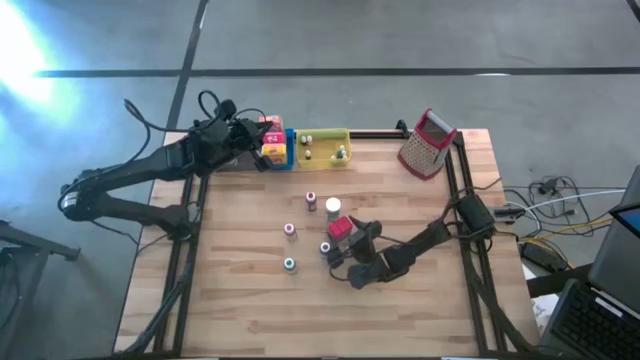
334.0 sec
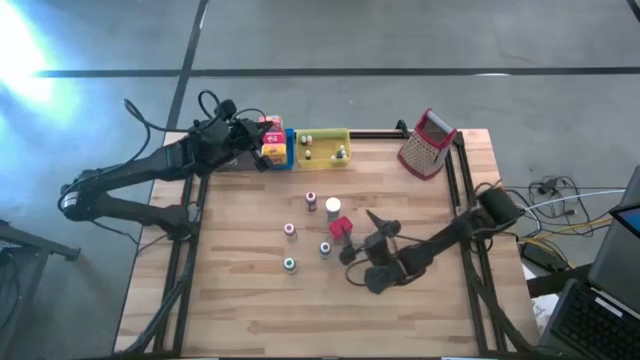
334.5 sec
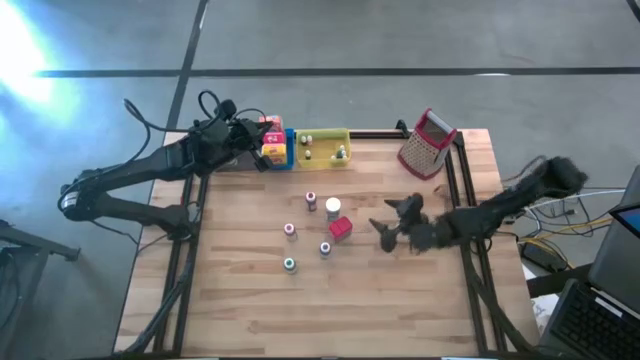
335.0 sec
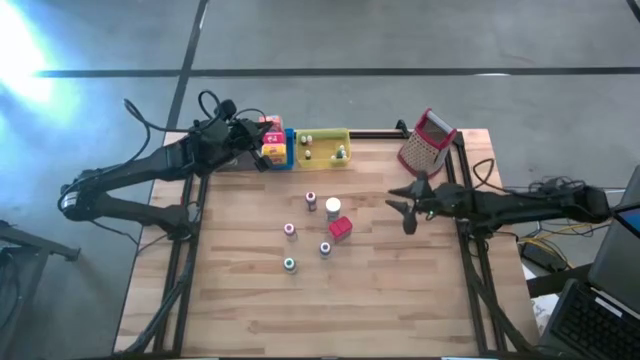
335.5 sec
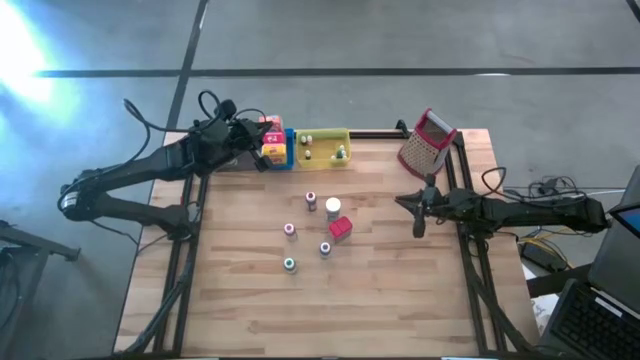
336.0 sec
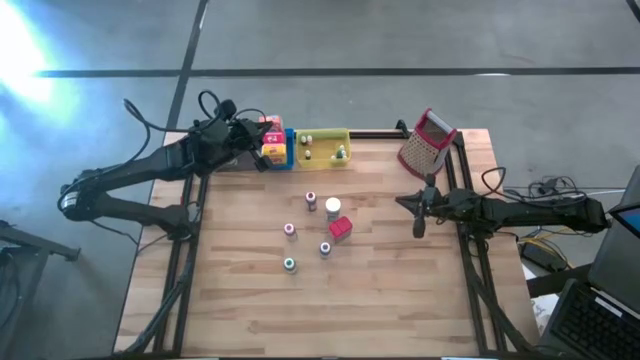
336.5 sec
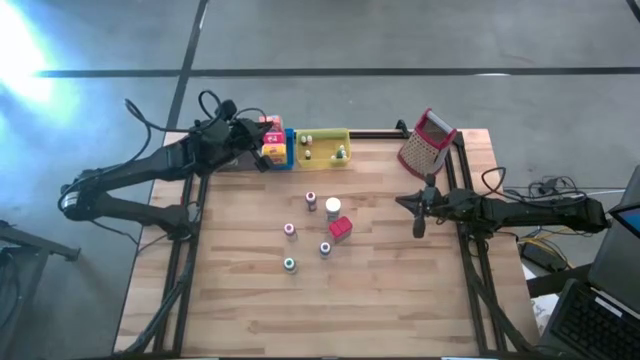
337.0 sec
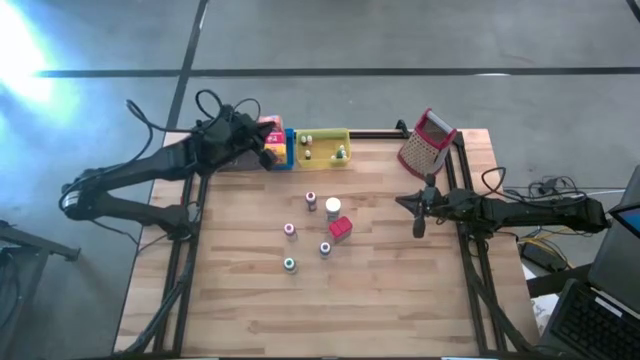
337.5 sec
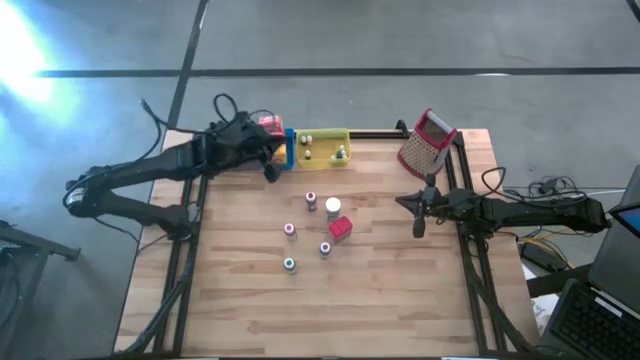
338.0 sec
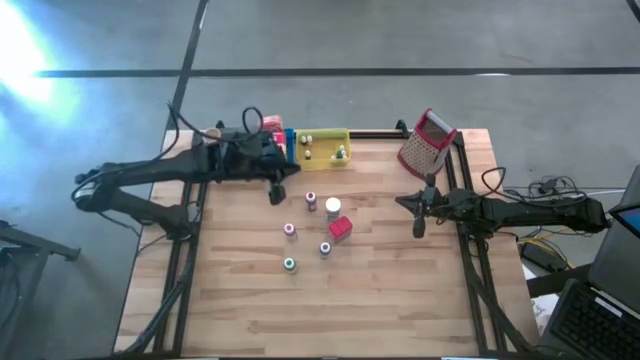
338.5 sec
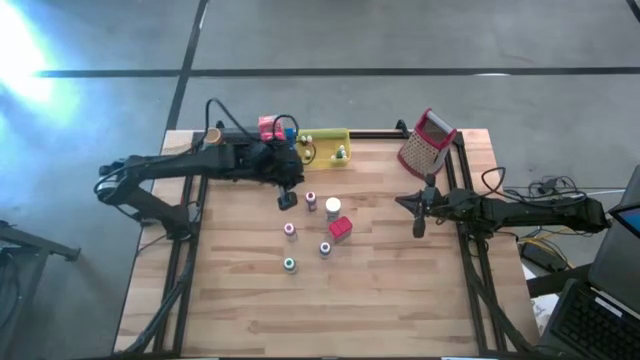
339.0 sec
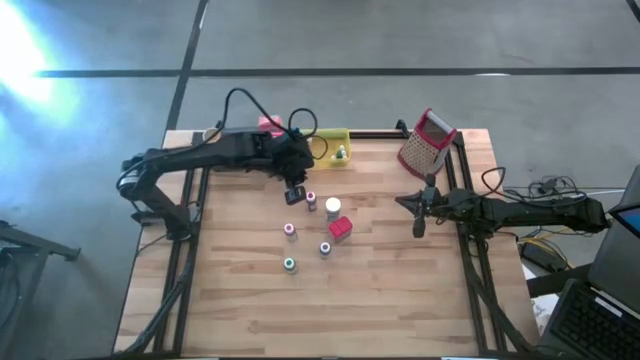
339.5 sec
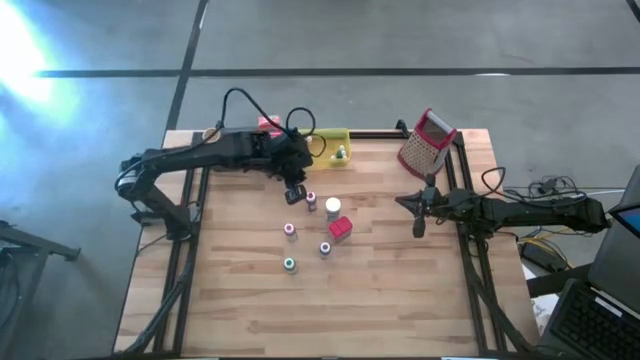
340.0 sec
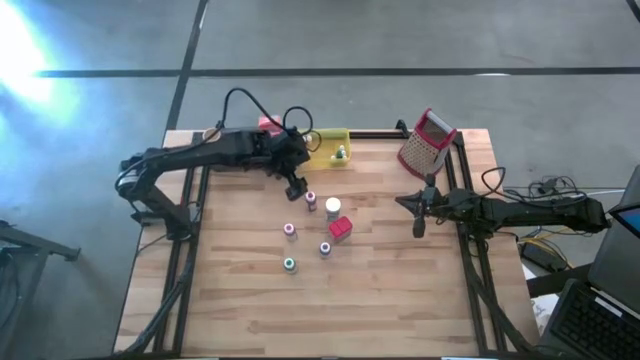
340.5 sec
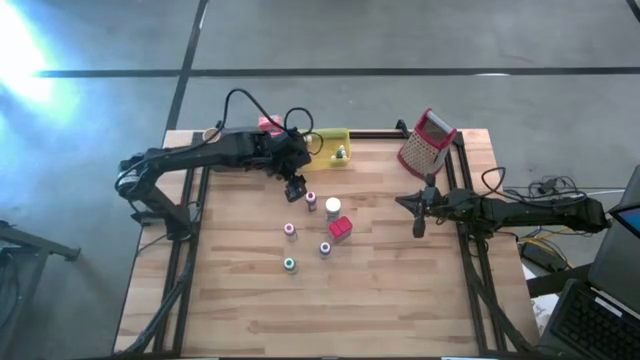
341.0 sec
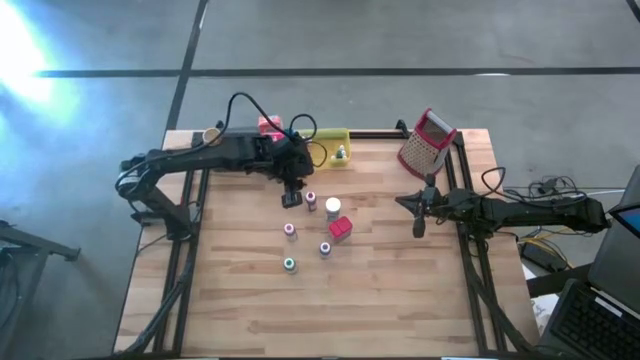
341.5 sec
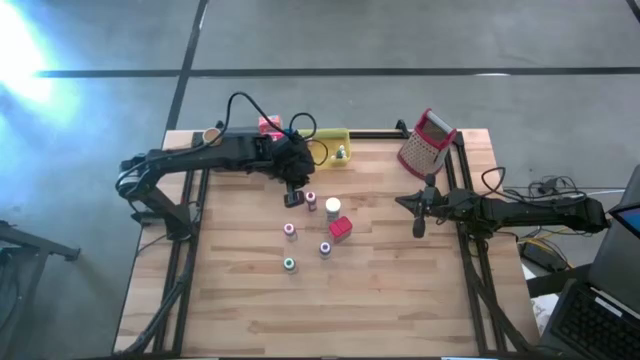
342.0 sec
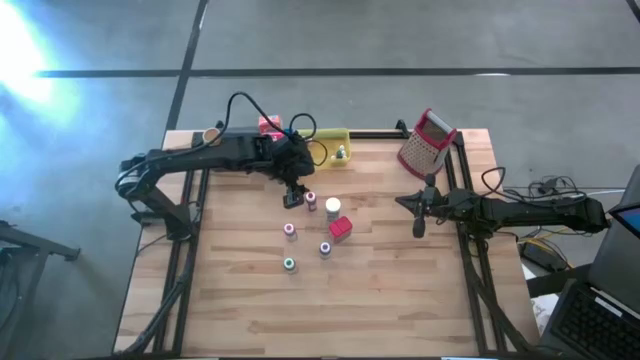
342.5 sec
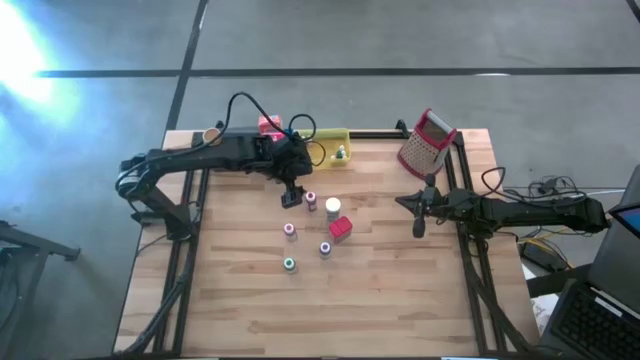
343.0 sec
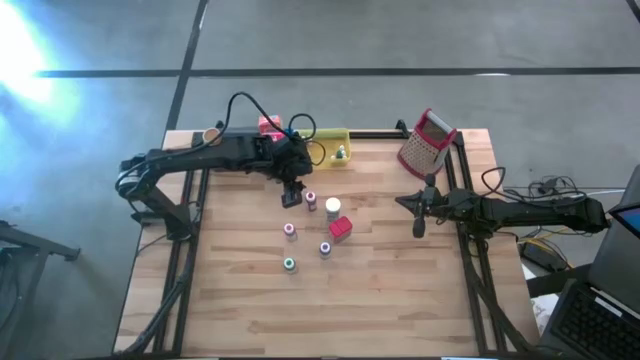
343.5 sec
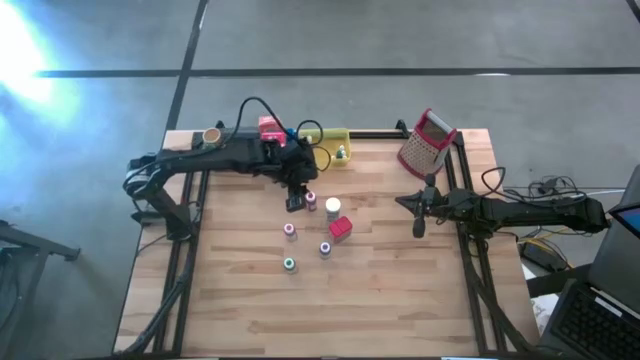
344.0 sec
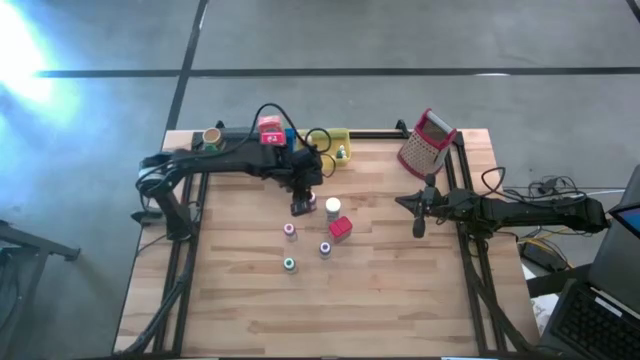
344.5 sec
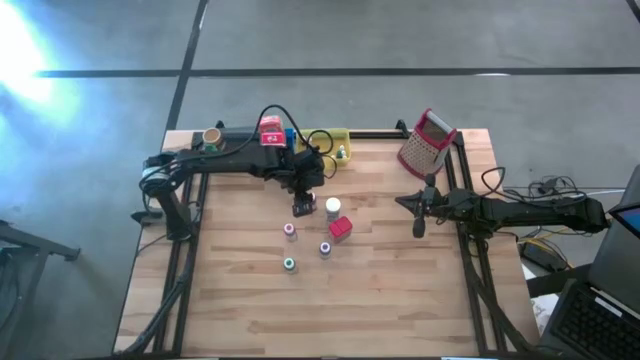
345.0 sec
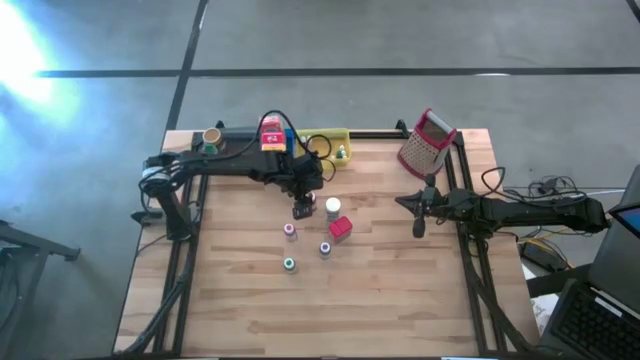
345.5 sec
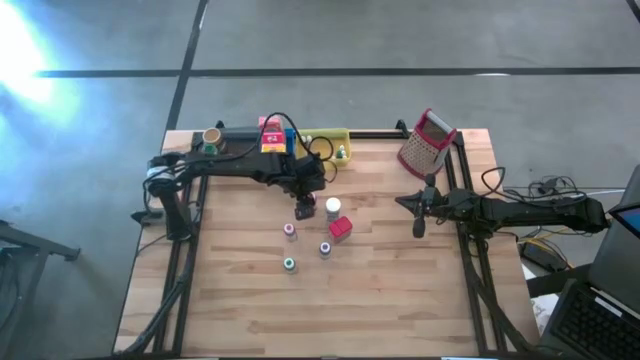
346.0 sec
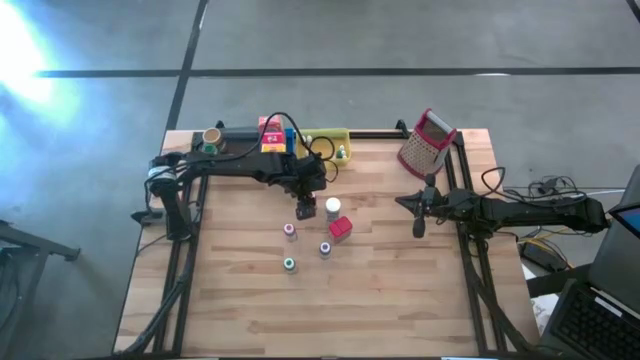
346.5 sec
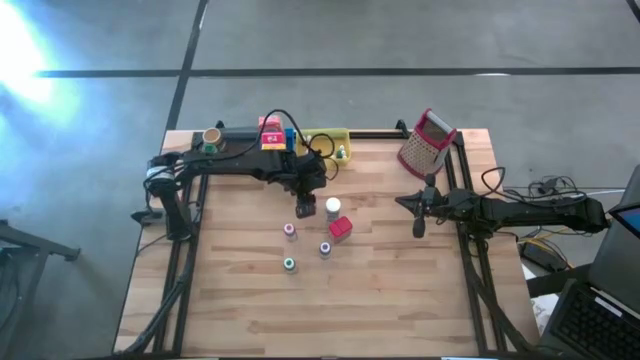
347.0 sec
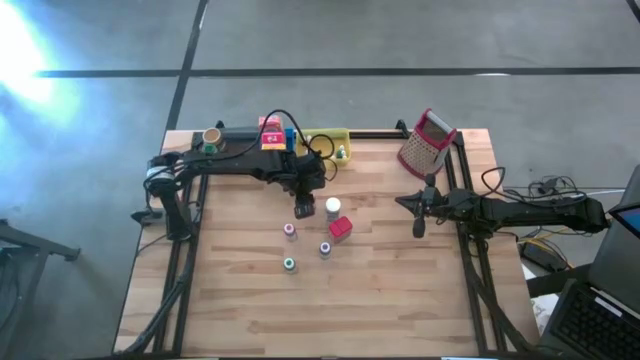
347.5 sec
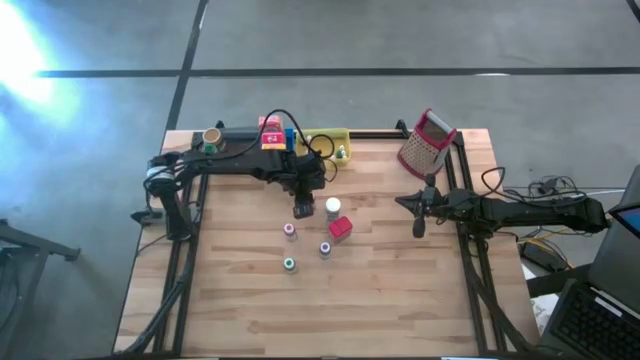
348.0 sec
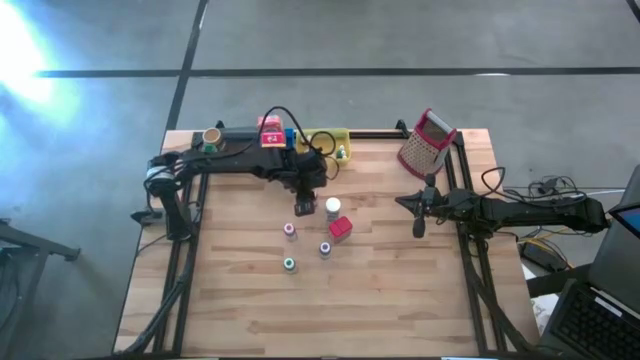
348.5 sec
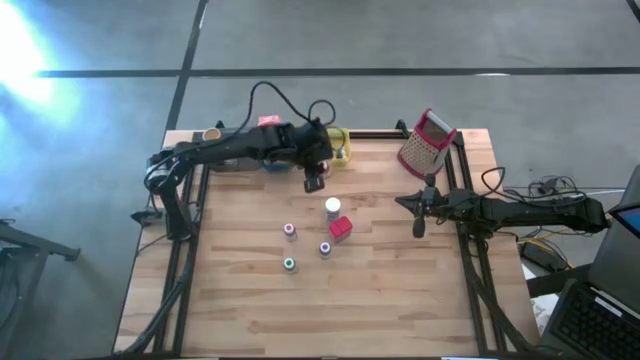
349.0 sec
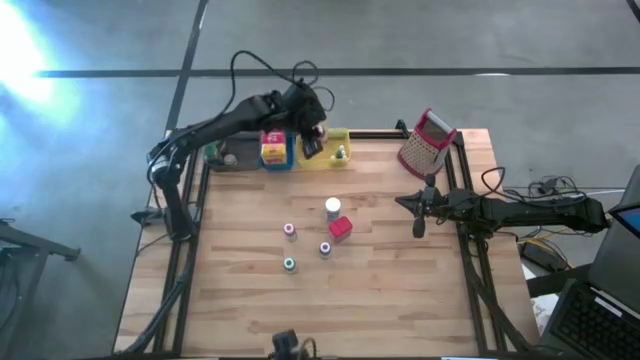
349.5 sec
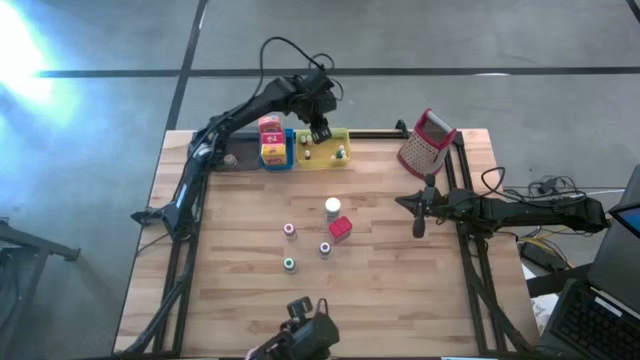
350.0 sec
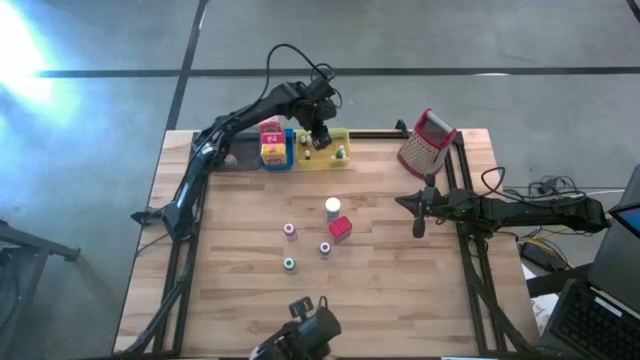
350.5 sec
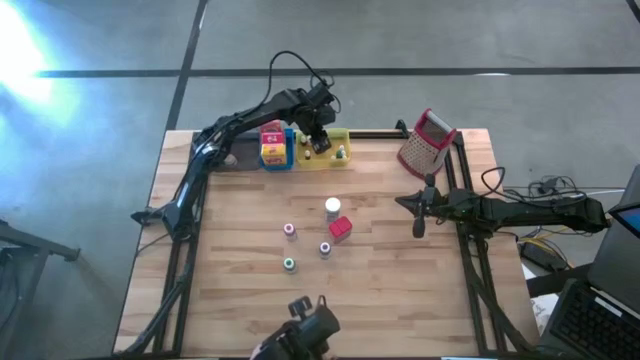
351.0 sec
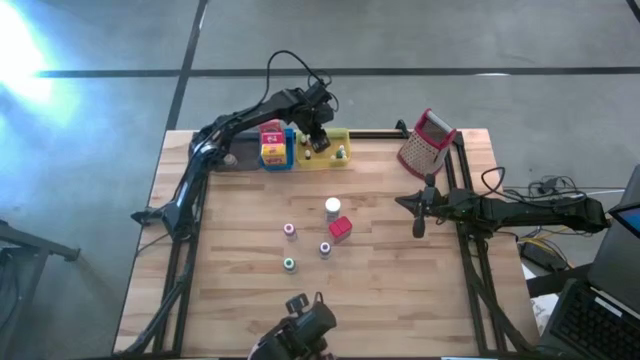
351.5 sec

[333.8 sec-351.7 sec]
Task: Pick & Place Kitchen Items
Put the red food coloring bottle into the yellow bin

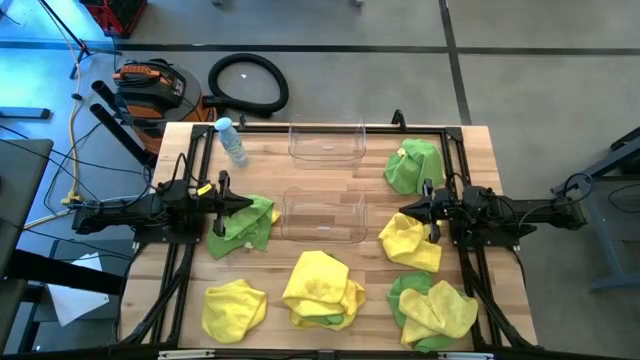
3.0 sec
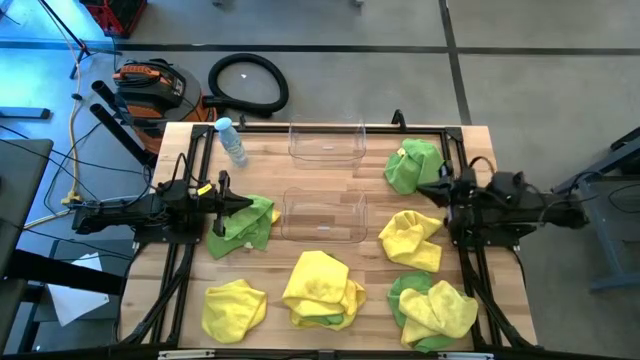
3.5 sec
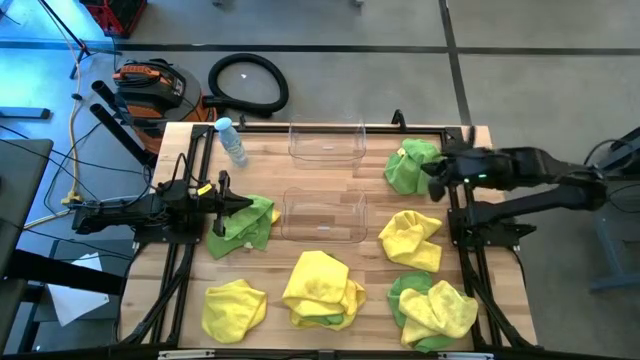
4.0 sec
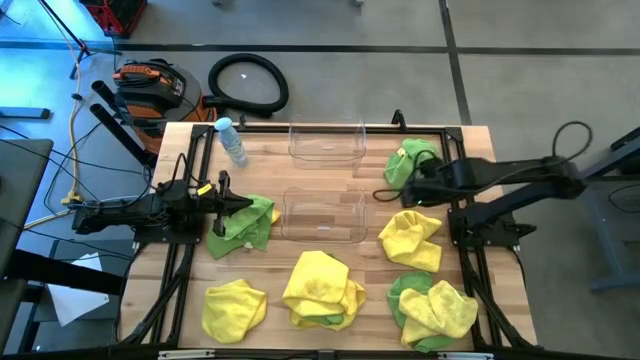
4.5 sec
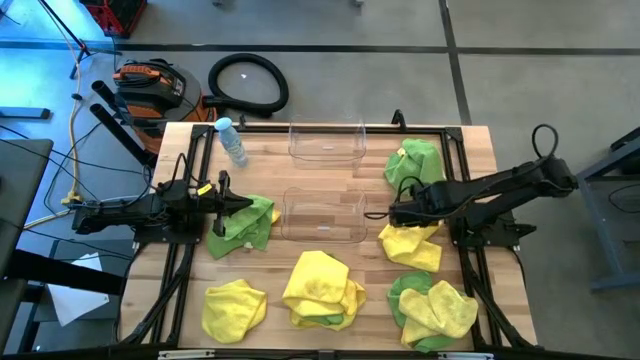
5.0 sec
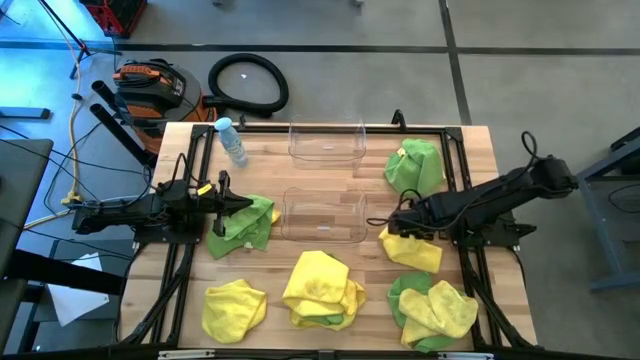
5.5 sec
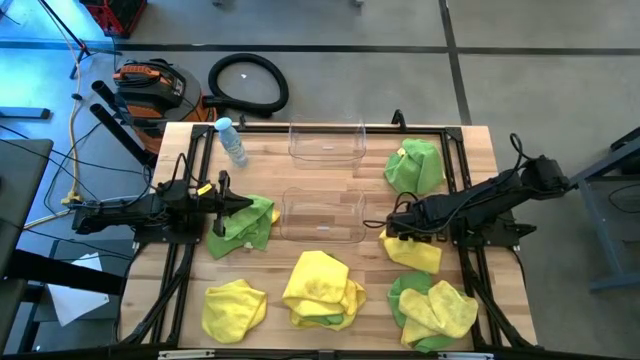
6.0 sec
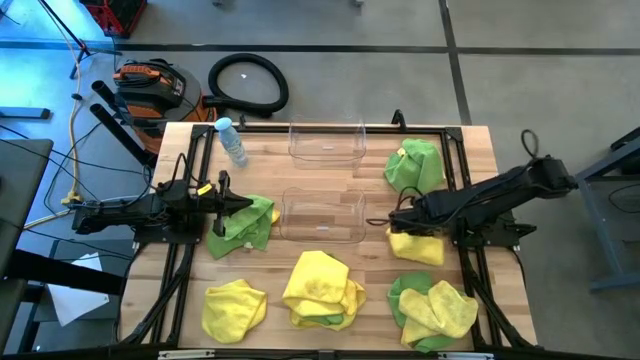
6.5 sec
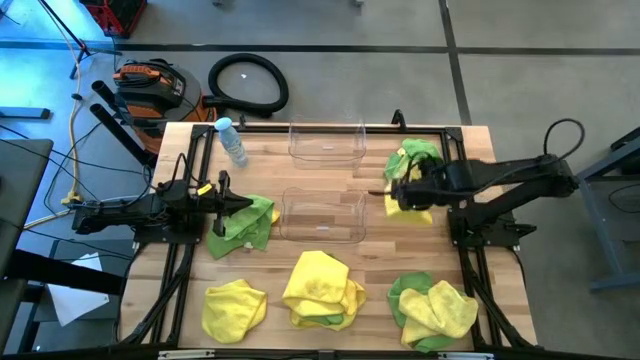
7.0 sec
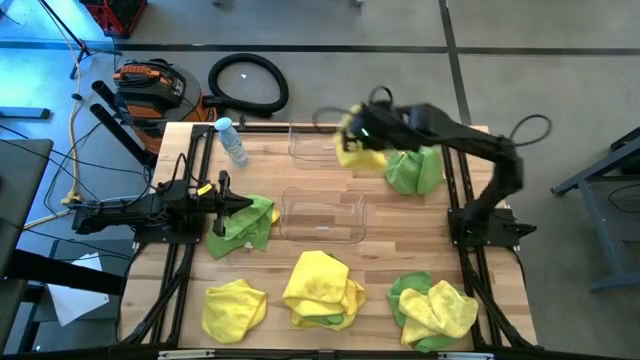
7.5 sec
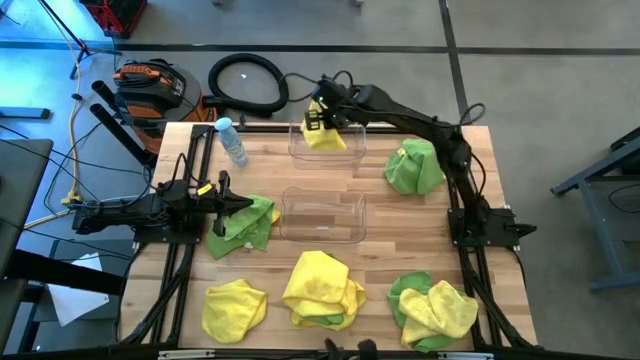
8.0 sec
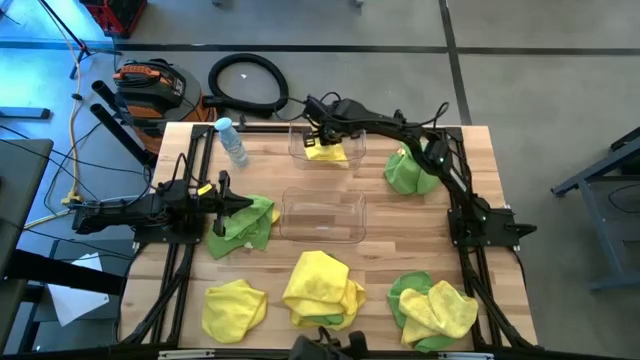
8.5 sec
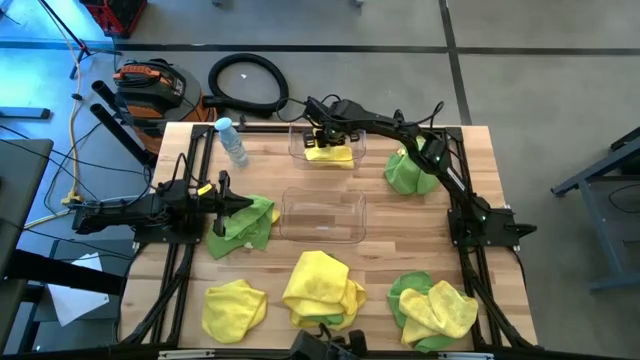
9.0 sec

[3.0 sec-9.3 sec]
Task: Sort microfiber towel by color & place in baskets
Put the yellow towel into the top transparent bin
